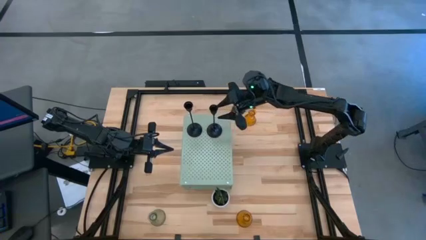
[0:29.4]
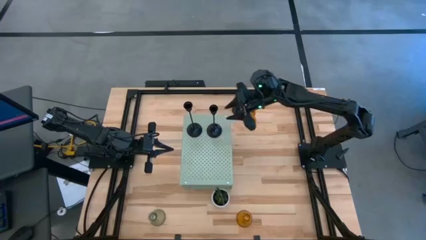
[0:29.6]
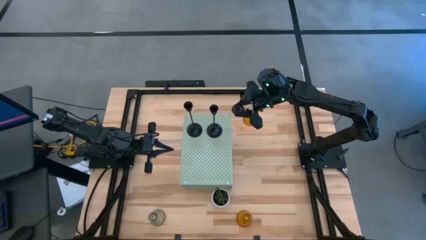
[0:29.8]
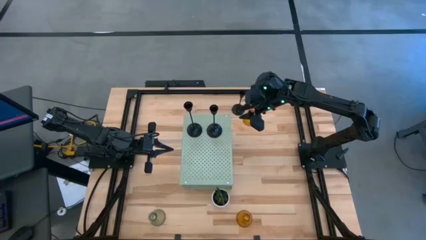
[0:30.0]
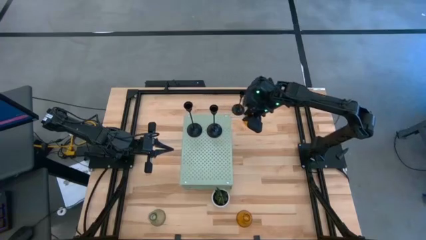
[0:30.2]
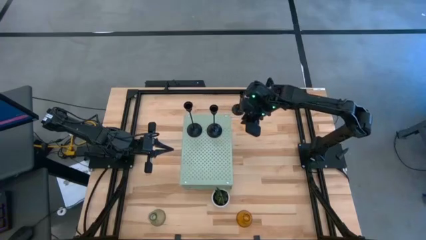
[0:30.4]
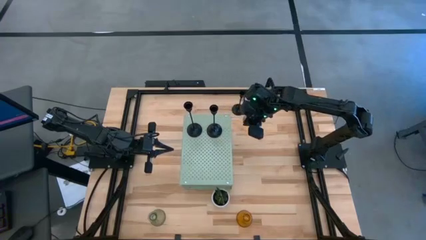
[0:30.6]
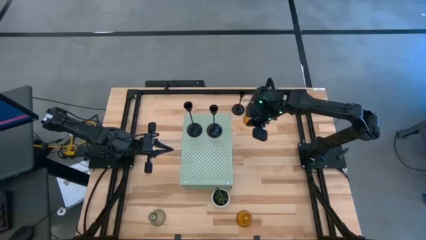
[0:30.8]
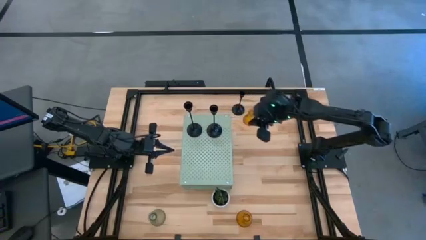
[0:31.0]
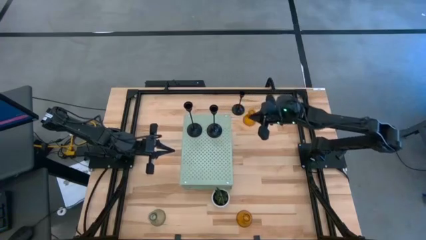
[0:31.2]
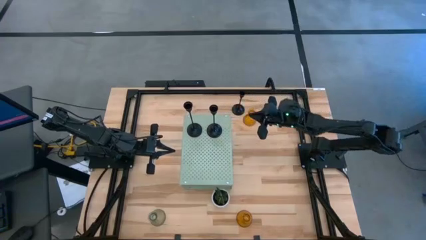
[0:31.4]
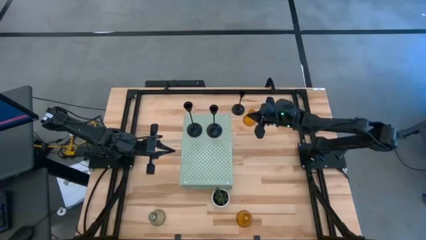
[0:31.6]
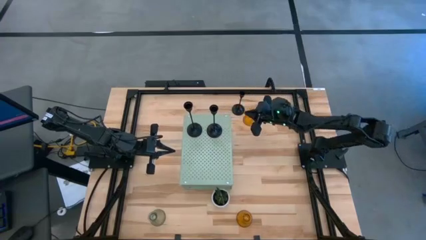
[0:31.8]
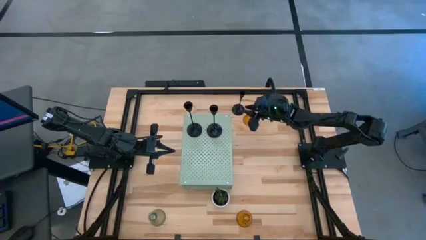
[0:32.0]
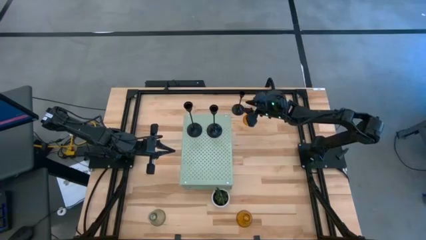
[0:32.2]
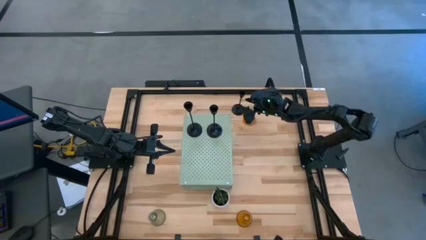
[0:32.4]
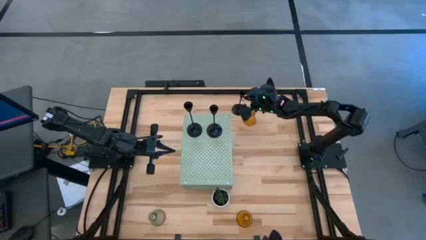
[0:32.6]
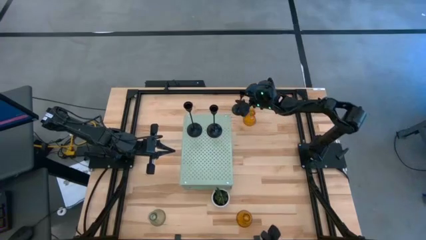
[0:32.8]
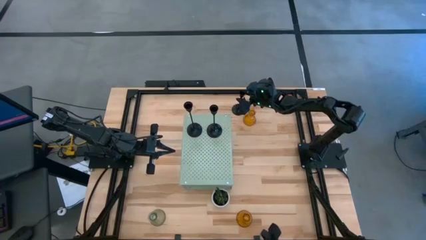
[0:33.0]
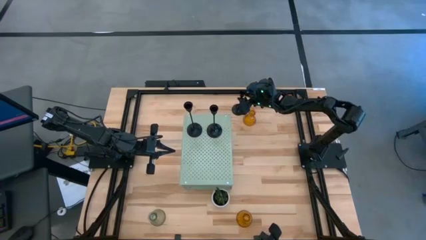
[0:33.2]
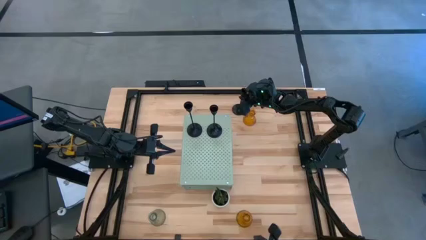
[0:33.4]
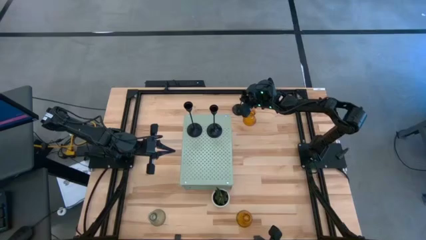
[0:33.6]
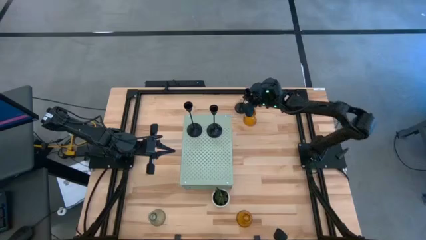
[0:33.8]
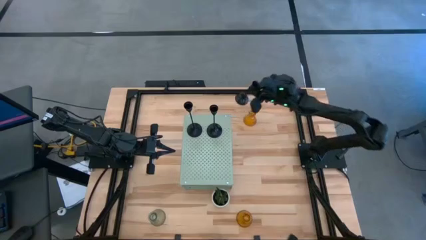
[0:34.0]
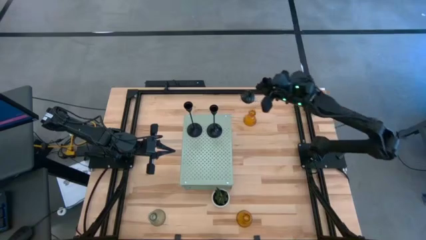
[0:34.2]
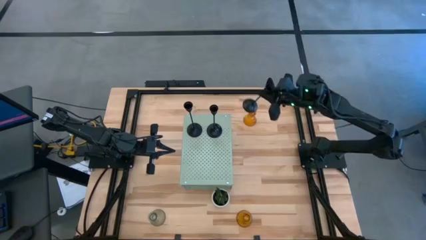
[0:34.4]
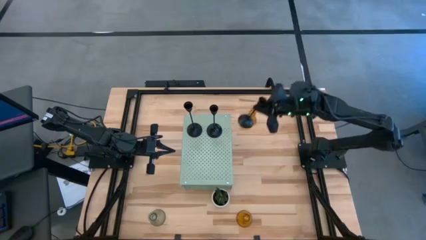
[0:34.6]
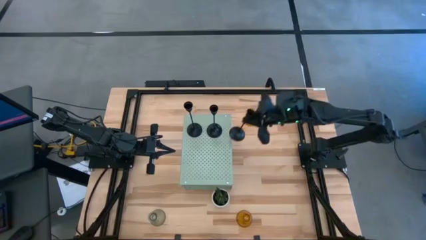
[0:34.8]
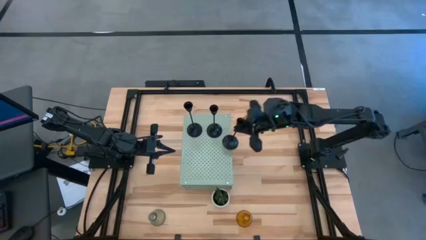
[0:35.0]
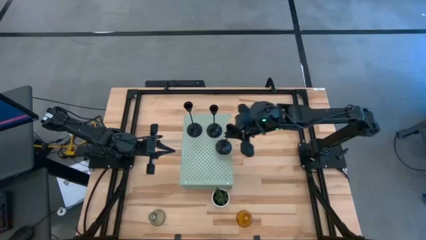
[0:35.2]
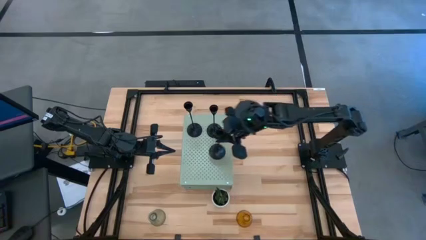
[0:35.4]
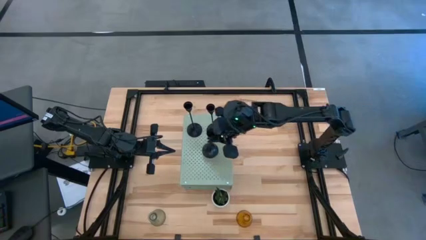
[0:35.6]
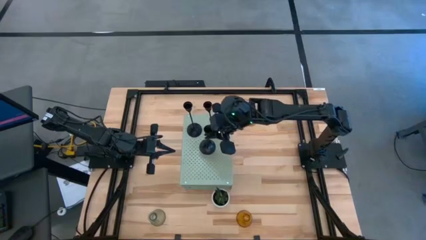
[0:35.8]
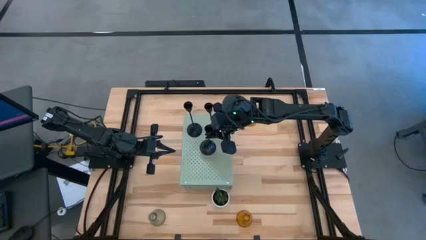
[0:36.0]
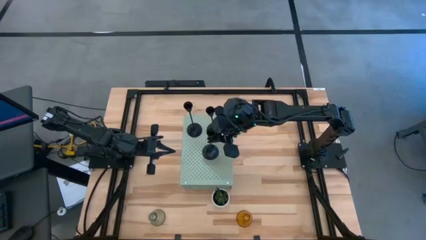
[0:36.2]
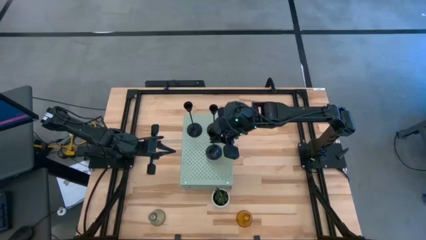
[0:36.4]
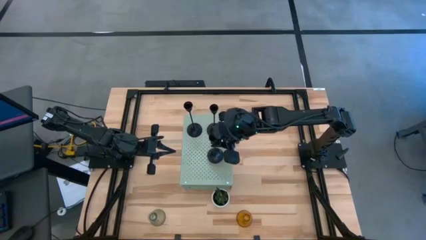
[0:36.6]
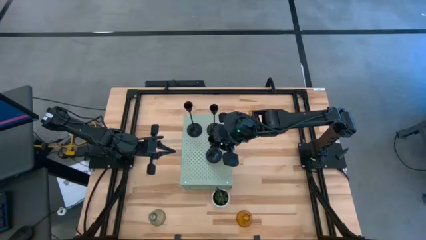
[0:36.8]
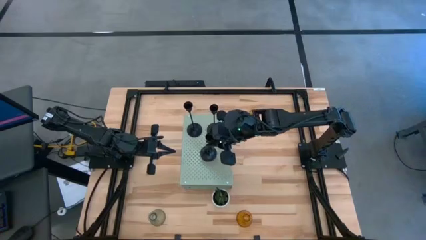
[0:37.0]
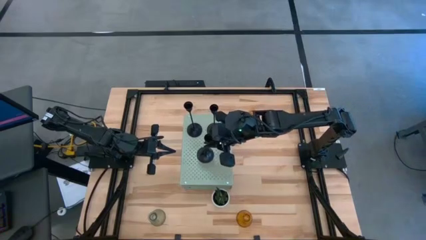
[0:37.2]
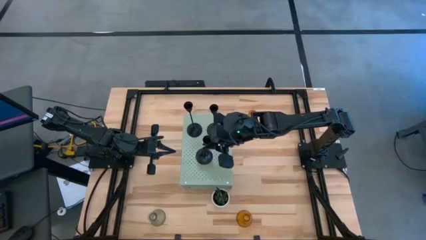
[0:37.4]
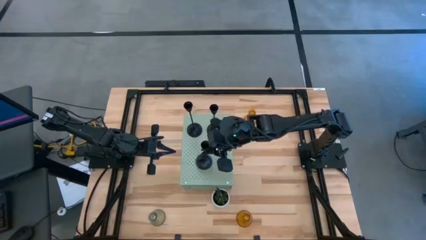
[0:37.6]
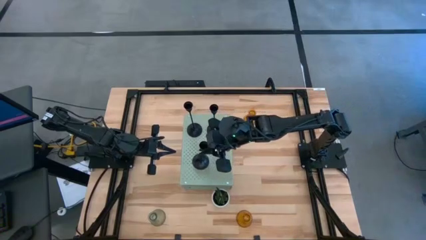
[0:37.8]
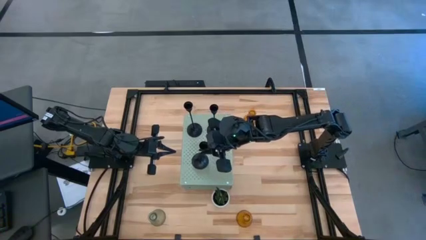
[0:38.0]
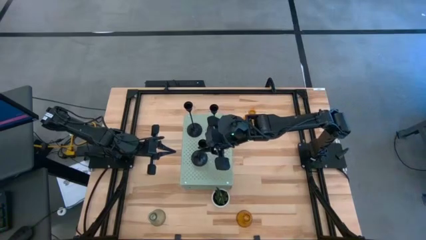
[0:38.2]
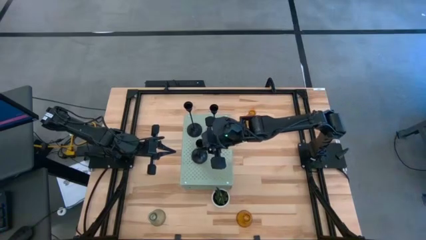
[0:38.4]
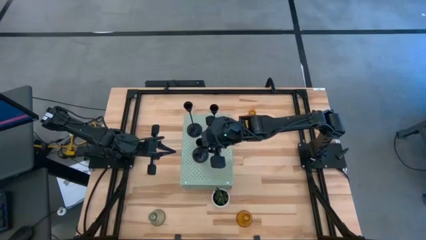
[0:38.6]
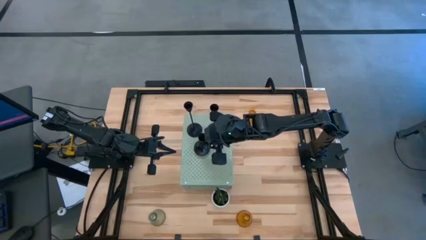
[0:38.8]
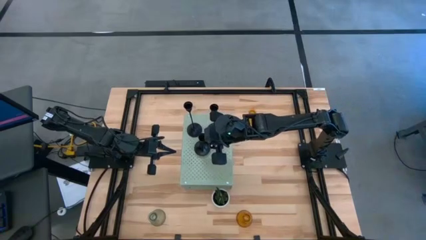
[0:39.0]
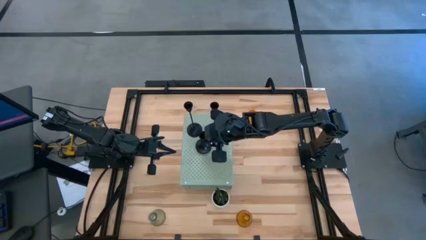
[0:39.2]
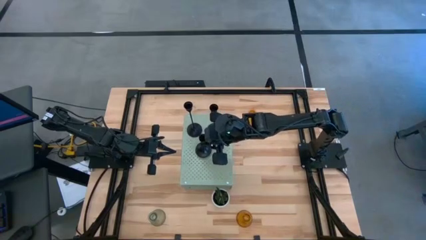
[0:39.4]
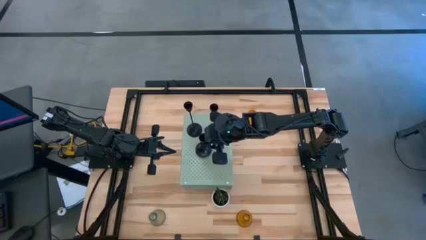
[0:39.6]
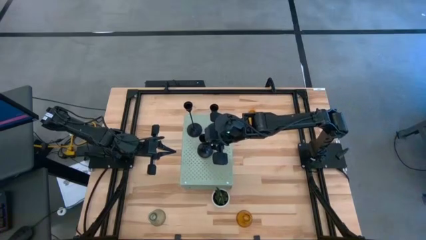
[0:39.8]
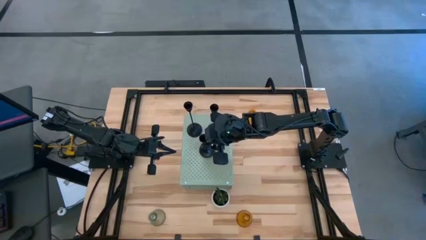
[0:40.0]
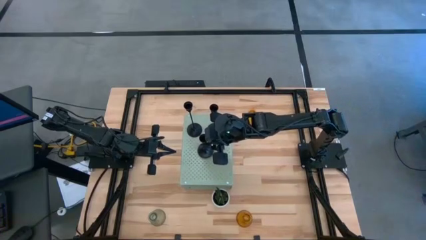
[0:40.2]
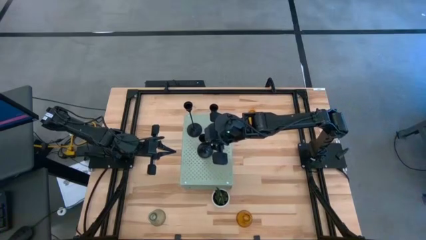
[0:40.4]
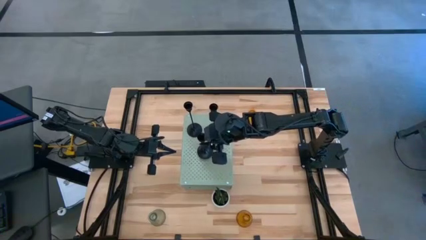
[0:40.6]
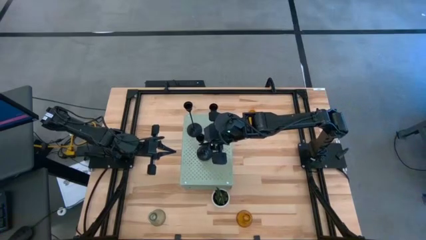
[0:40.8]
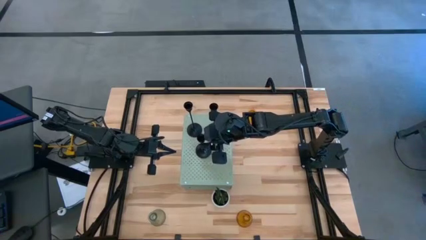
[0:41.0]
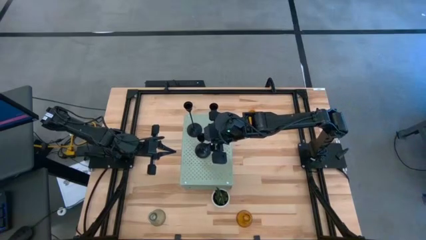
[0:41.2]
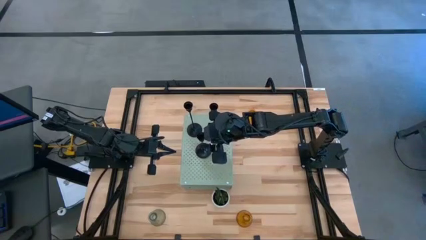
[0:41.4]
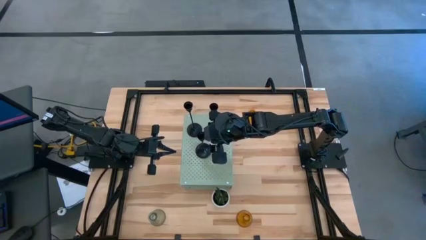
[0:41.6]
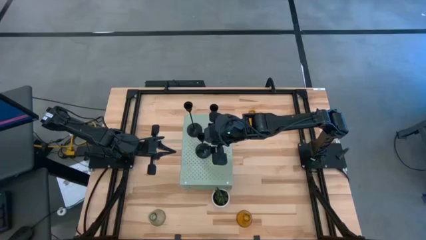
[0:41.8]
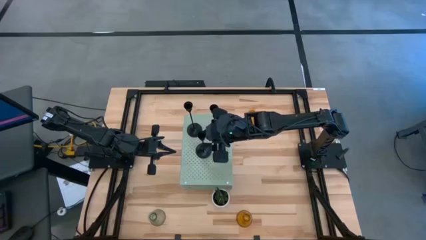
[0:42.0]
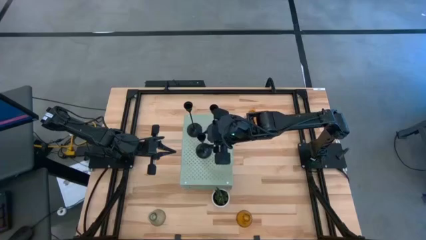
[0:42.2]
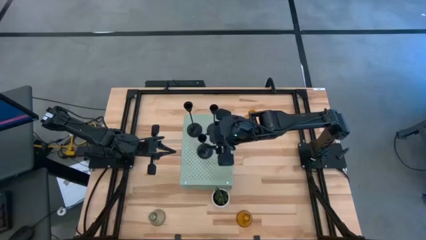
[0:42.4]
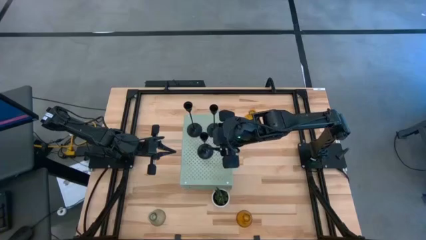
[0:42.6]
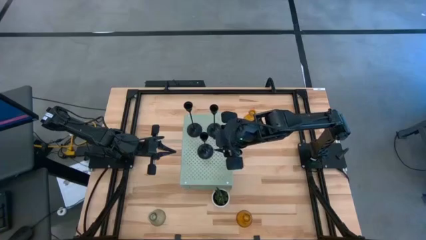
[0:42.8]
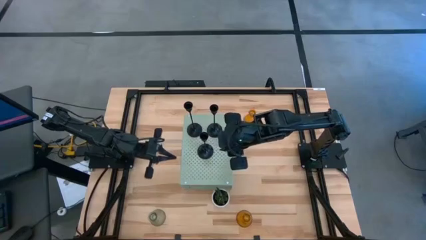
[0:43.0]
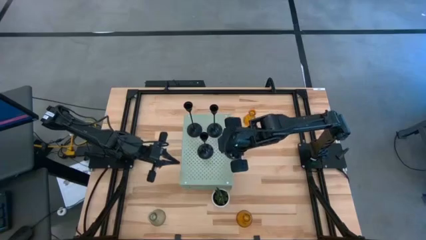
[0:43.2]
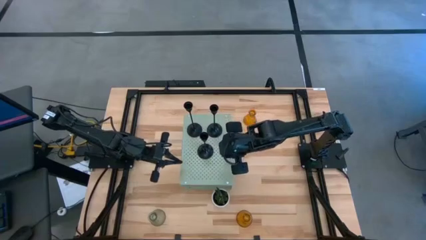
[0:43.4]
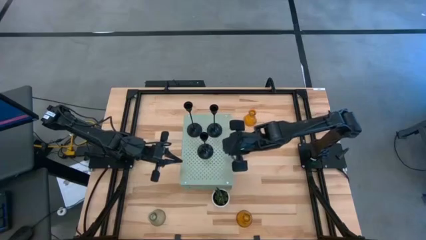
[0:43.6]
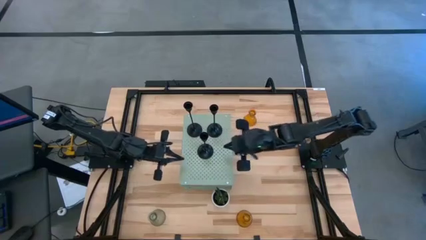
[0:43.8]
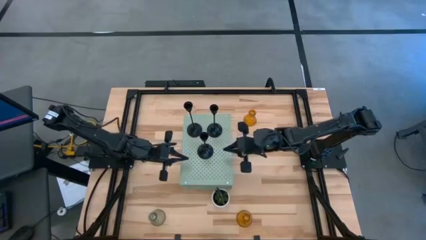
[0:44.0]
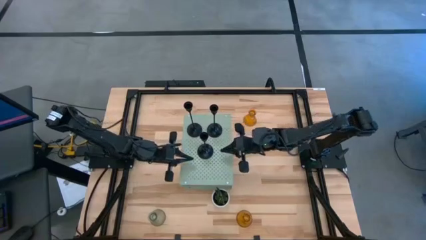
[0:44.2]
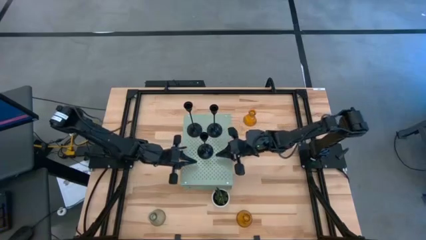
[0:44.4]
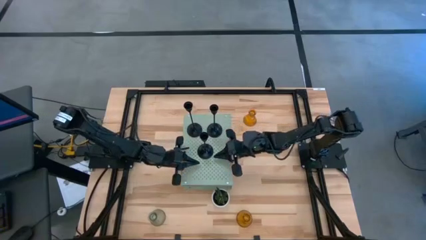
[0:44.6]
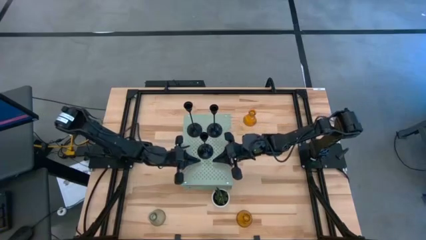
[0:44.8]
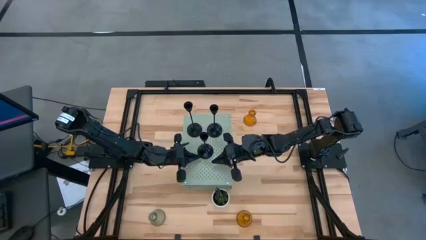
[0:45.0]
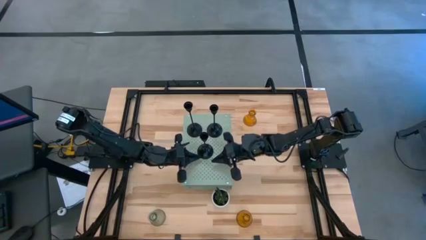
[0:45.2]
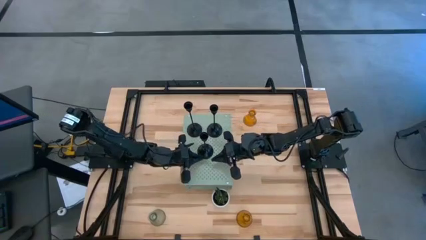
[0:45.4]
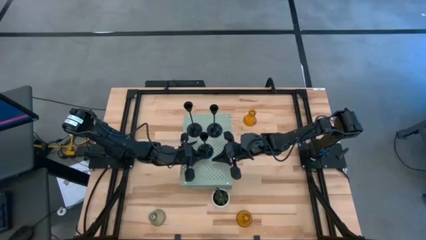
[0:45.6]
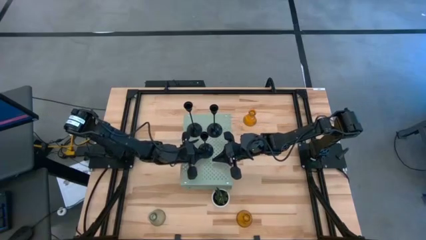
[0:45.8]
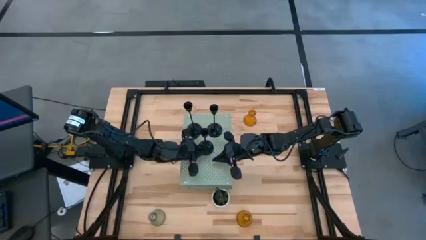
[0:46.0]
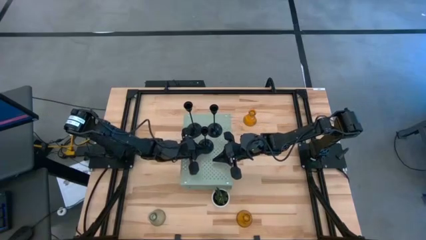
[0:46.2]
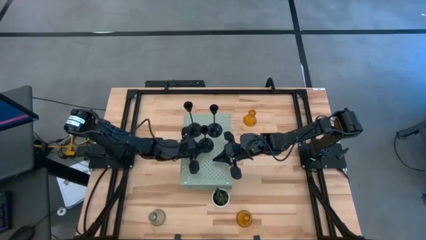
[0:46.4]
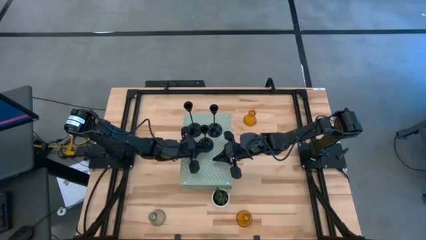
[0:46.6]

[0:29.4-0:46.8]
Task: Pick & Place candle stick holders
Put the black candle holder on the shelf
